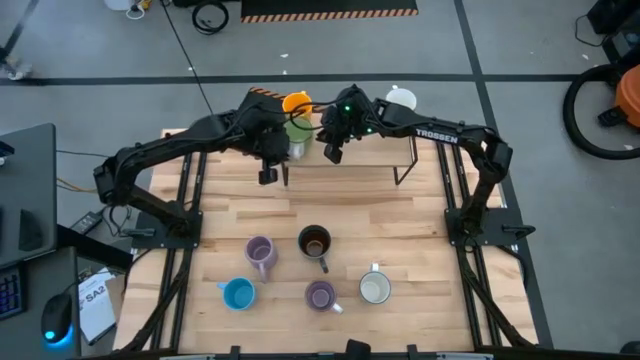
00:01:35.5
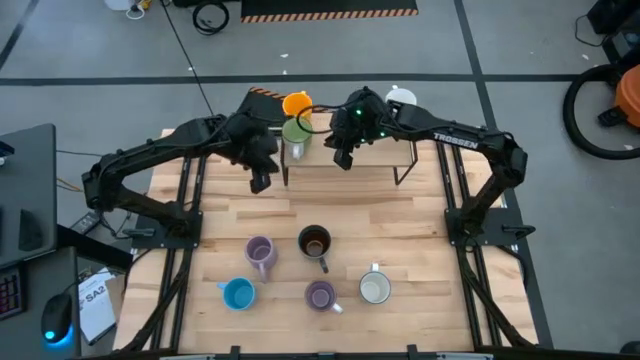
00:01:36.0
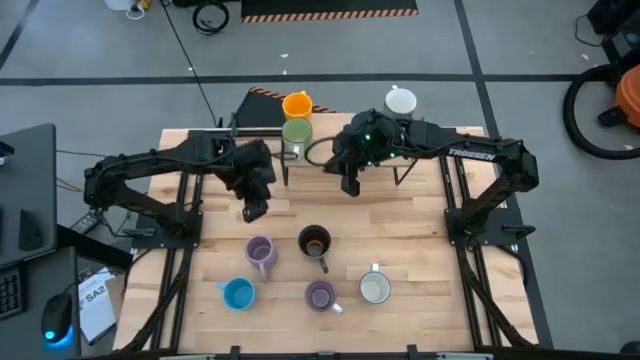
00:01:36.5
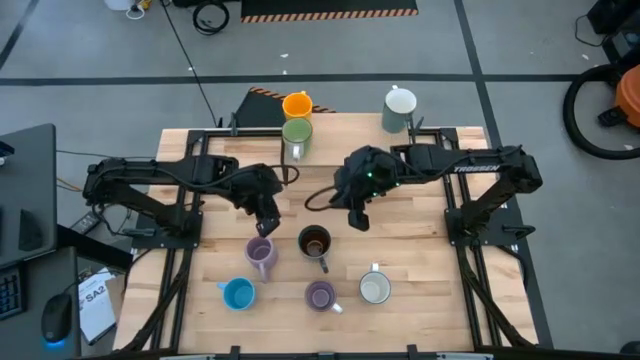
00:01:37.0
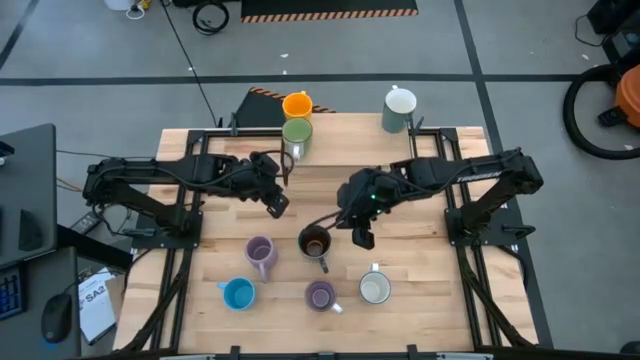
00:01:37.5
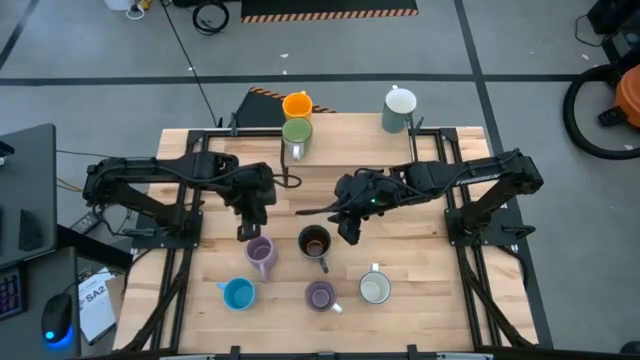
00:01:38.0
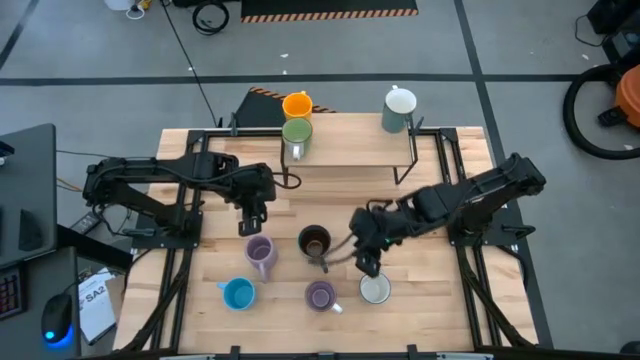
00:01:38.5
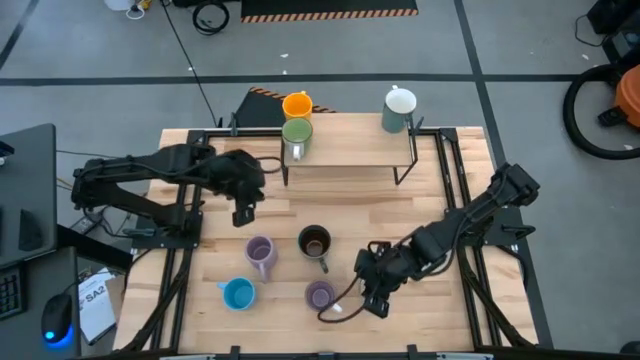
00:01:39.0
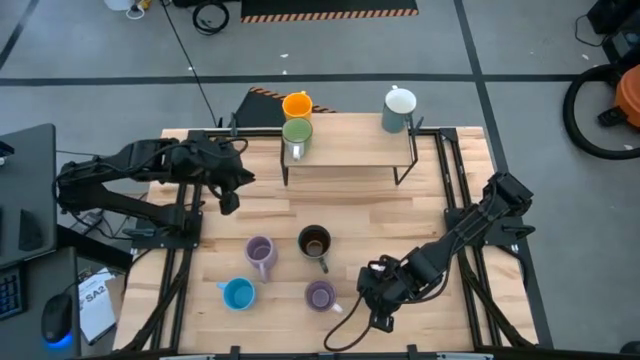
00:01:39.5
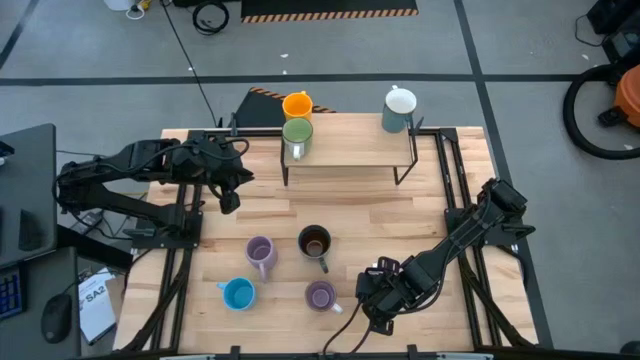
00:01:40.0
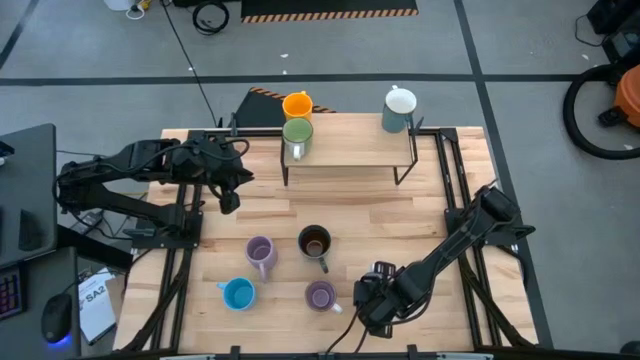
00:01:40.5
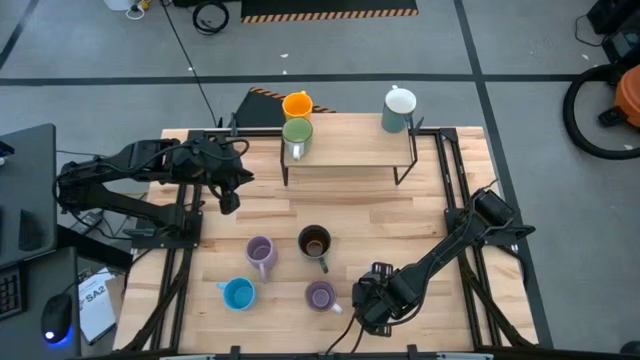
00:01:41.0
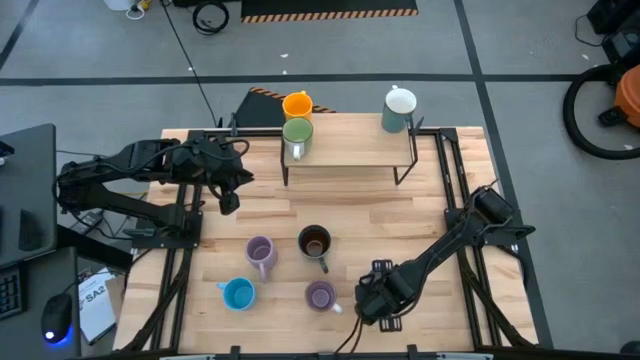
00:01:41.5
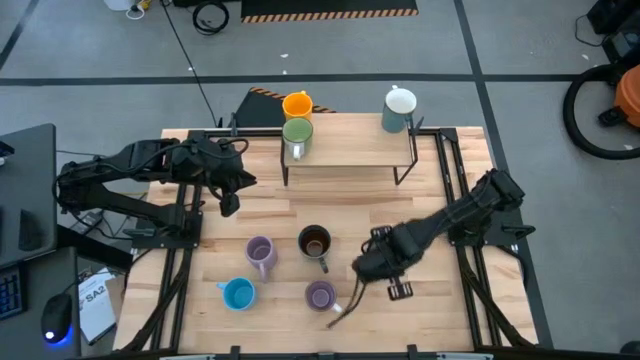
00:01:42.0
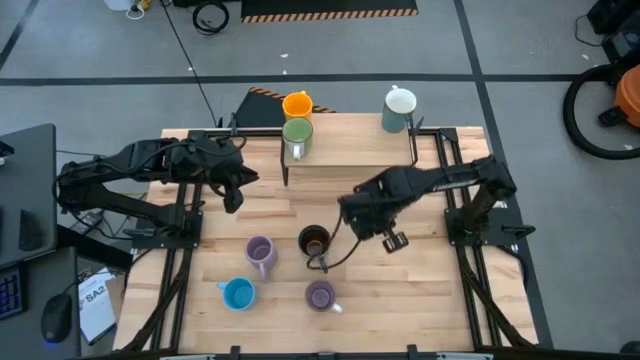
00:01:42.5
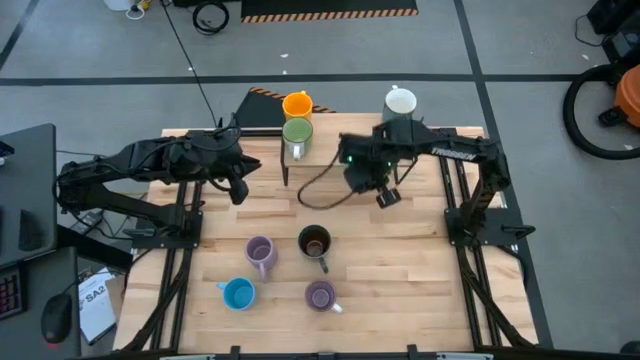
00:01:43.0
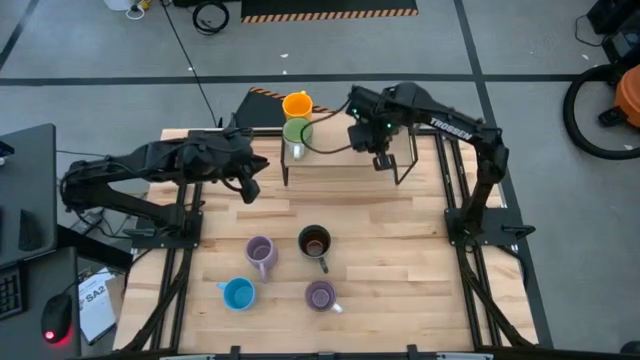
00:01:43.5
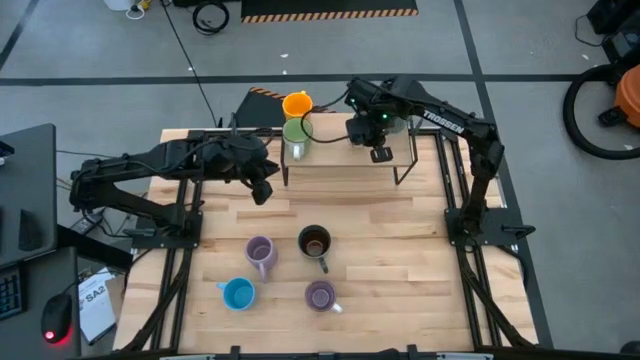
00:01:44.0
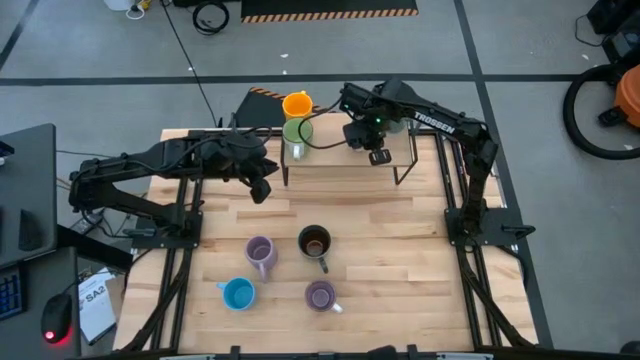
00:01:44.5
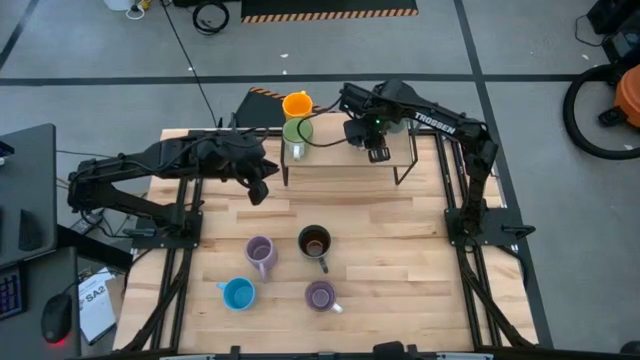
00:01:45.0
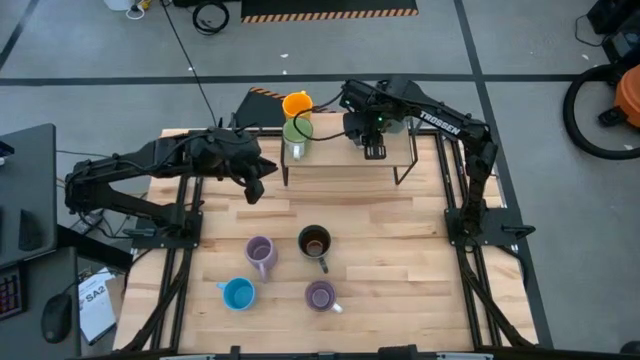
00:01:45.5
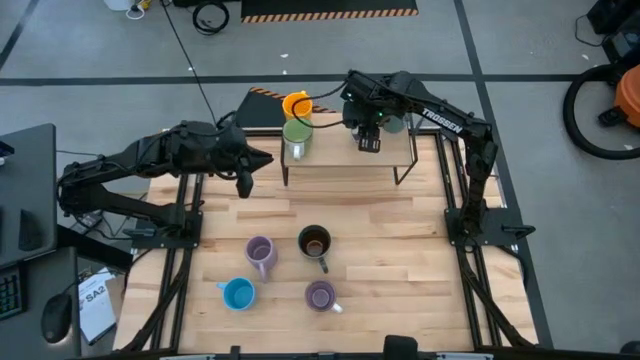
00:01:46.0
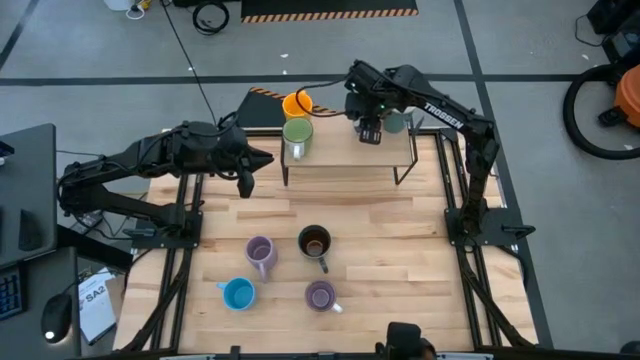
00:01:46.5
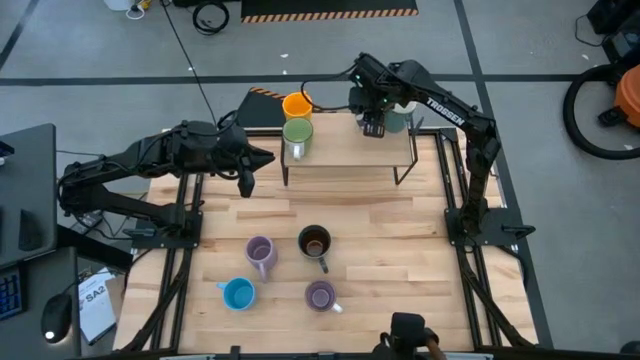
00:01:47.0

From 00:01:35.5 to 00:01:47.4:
Task: Place coffee mugs
Put the blue patterned mug on the shelf

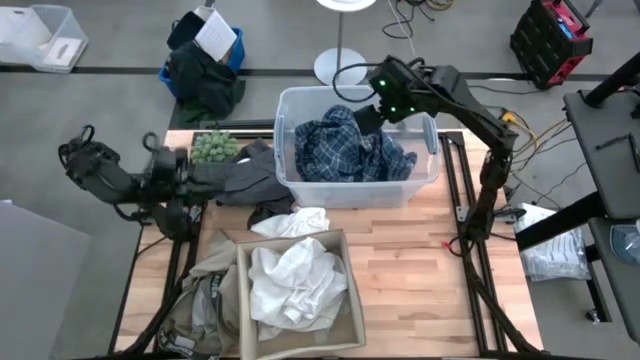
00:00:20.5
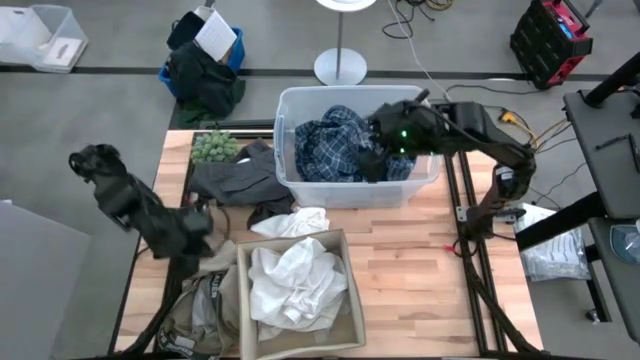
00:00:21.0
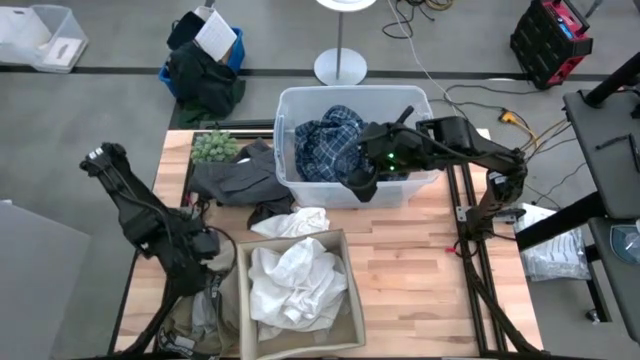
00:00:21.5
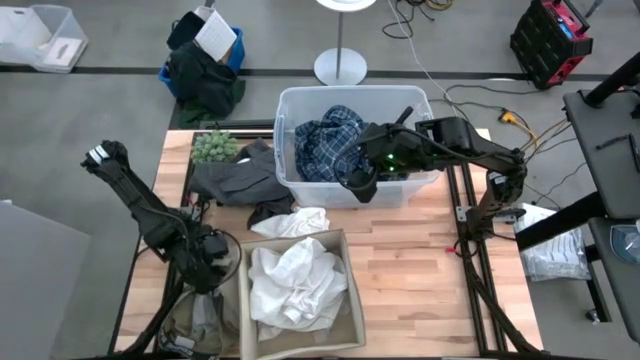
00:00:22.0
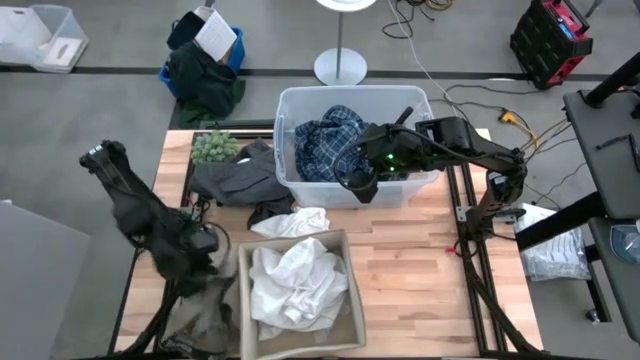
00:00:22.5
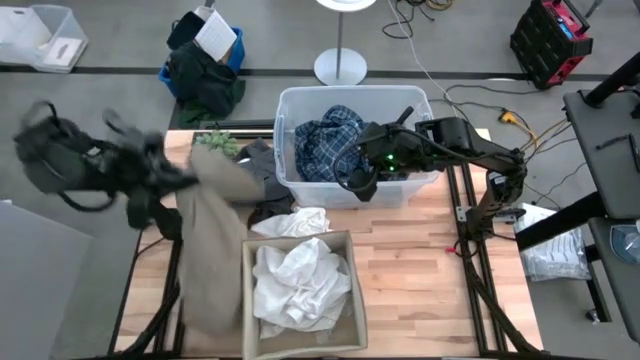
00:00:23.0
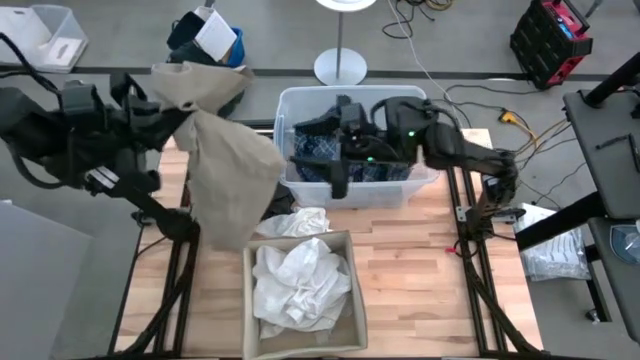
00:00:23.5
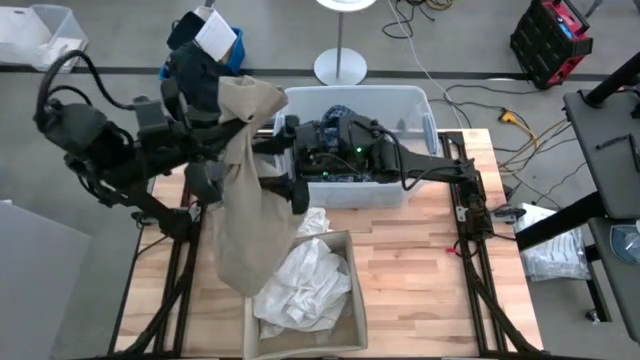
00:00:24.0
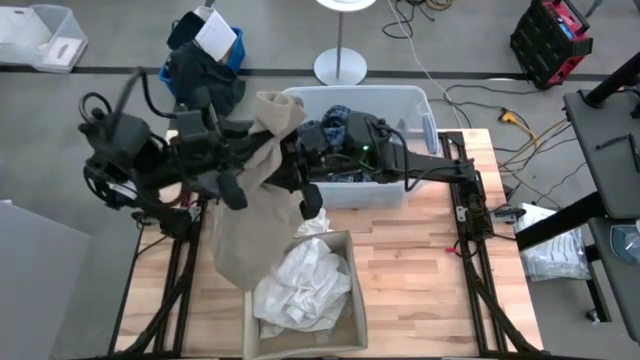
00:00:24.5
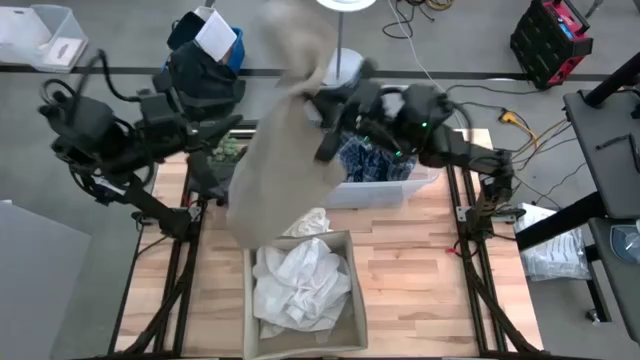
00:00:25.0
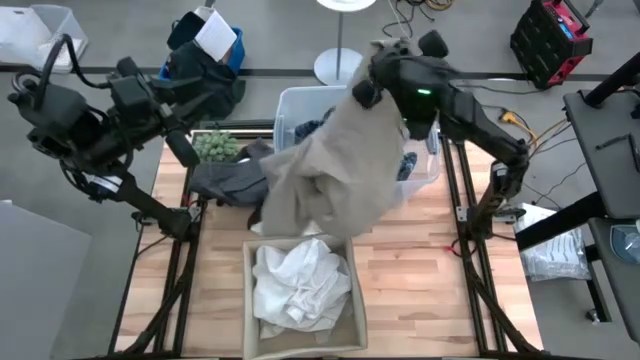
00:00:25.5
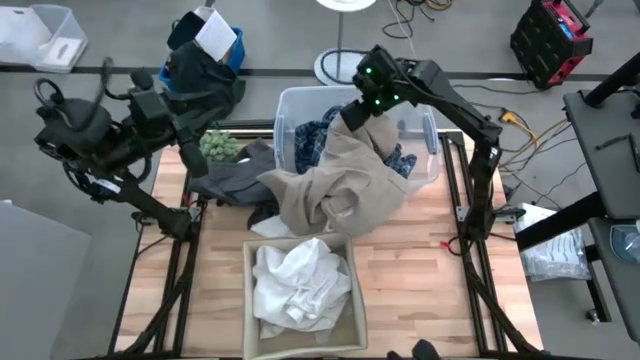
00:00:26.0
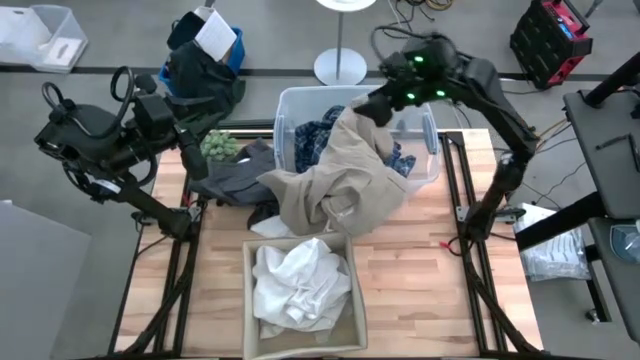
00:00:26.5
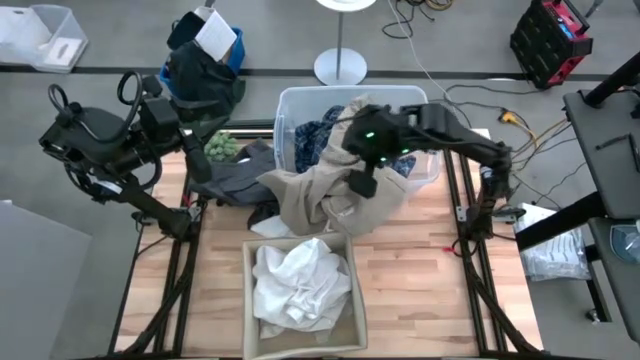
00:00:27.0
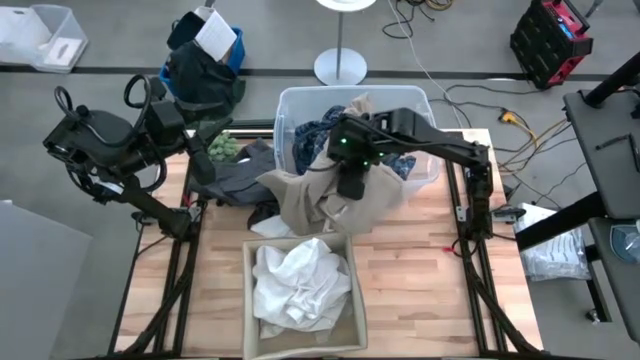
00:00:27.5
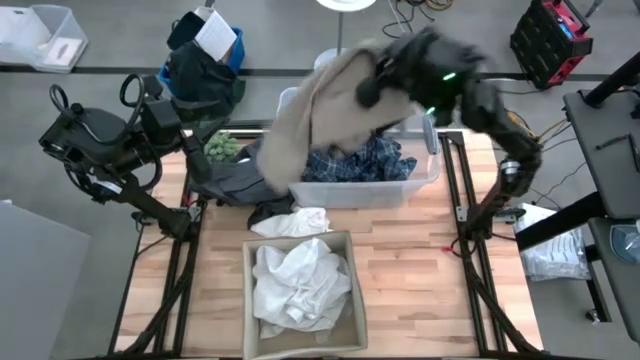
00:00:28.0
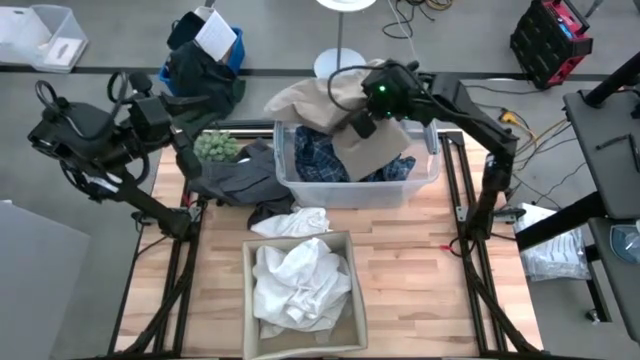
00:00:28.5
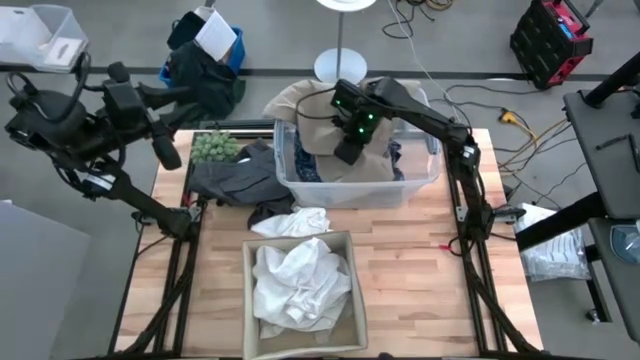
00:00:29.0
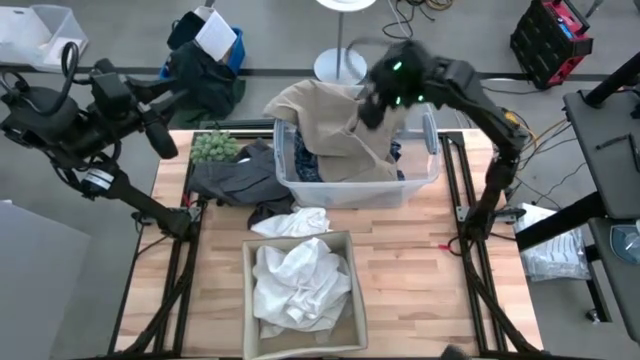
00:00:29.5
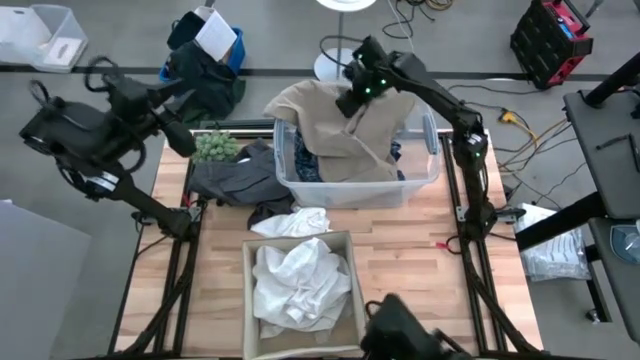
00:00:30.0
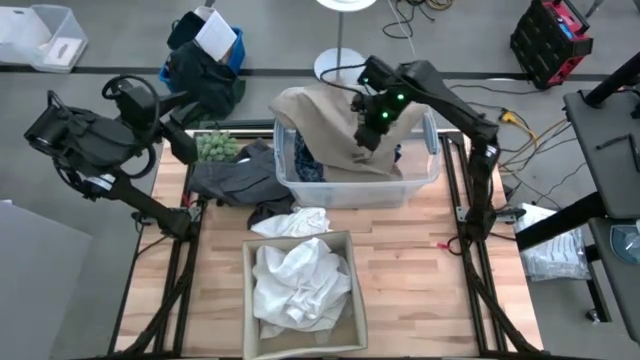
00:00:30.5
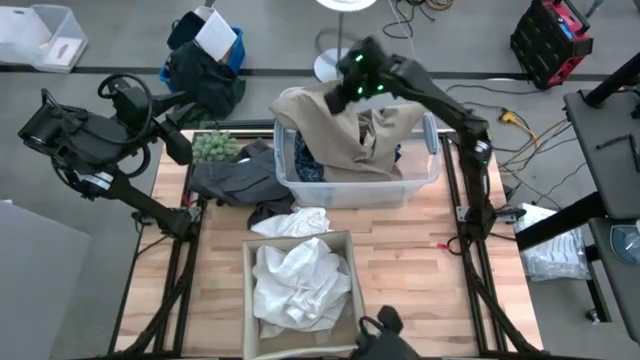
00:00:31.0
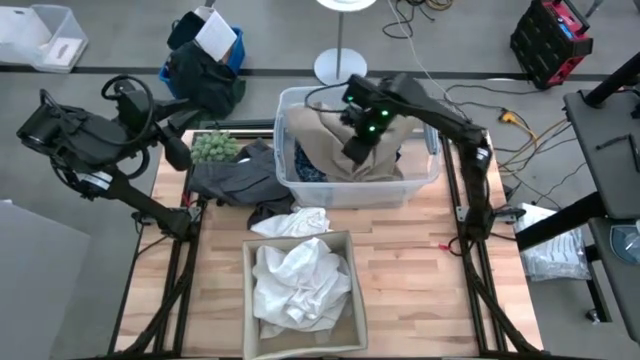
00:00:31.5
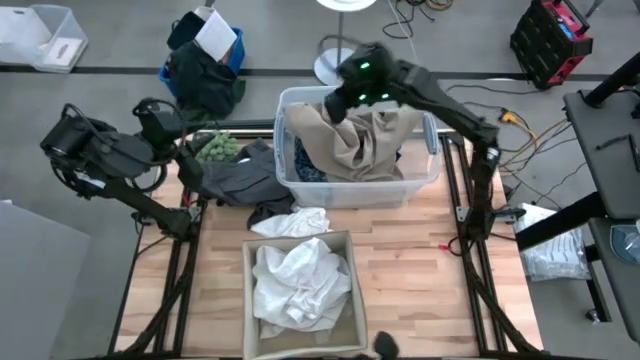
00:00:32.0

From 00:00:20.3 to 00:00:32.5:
Task: Sort clothes
Put the brown shorts into the transparent bin
